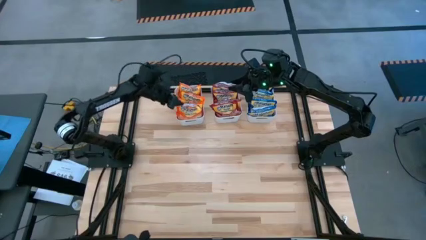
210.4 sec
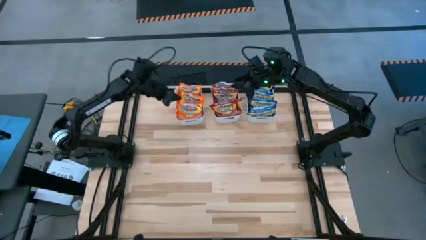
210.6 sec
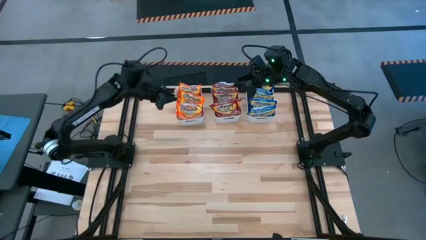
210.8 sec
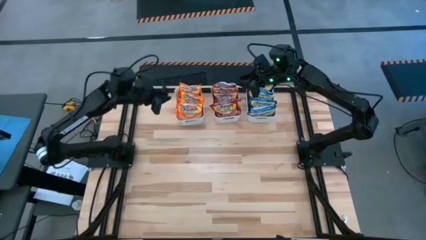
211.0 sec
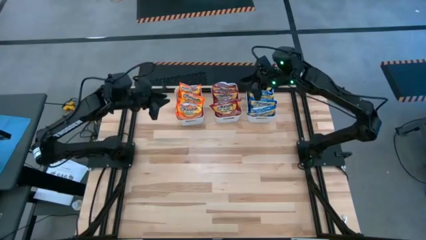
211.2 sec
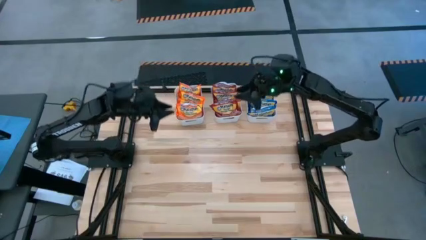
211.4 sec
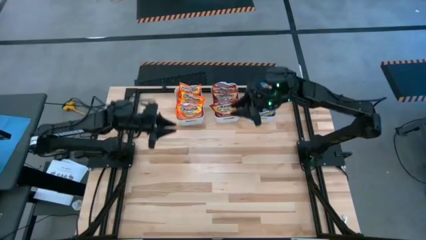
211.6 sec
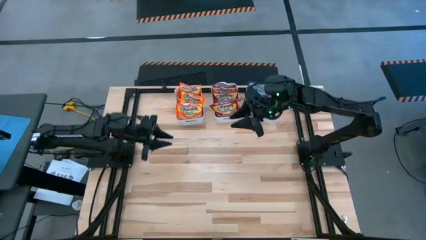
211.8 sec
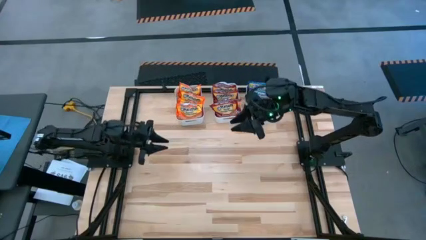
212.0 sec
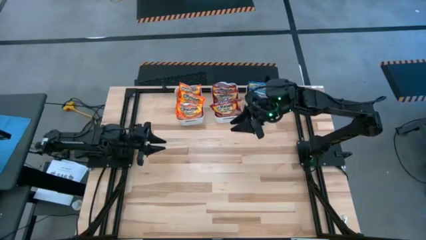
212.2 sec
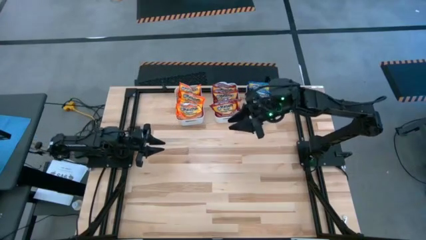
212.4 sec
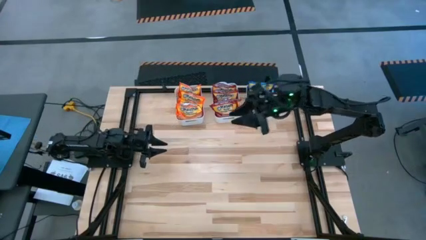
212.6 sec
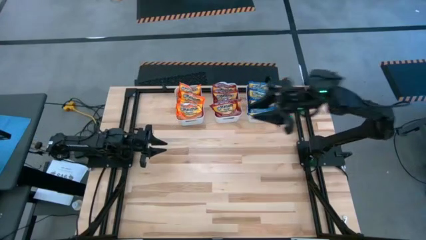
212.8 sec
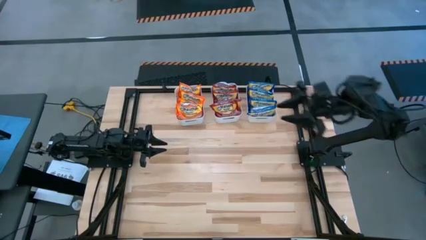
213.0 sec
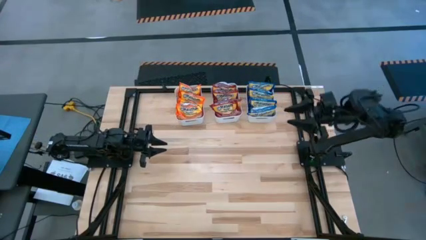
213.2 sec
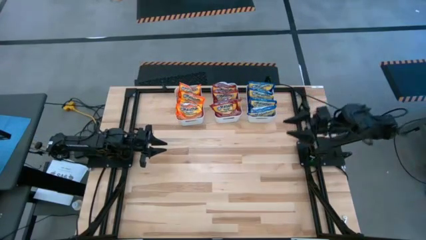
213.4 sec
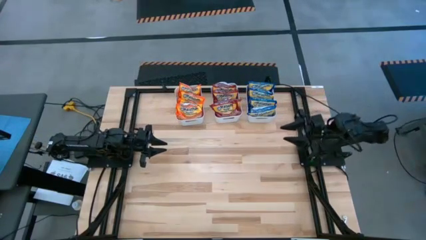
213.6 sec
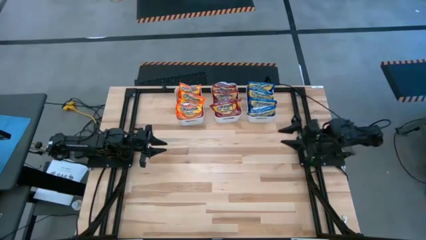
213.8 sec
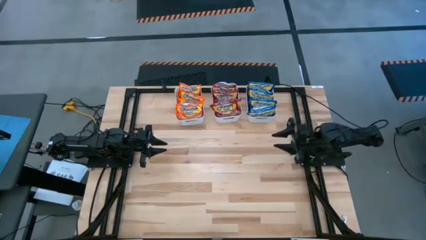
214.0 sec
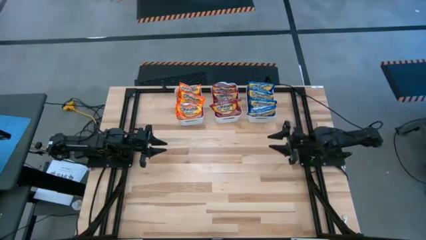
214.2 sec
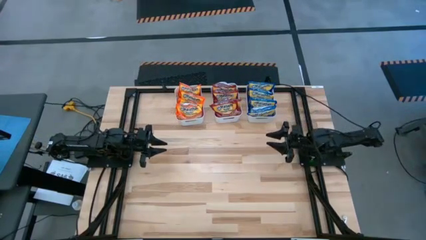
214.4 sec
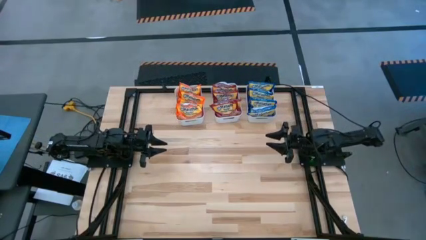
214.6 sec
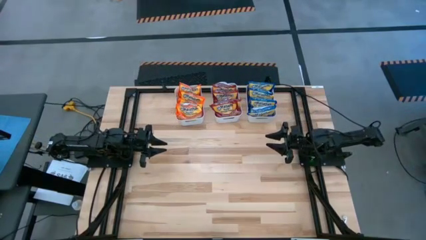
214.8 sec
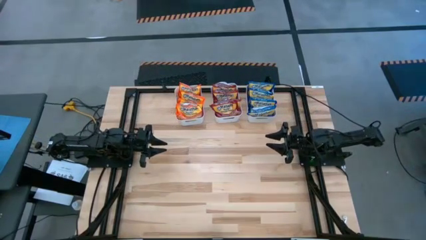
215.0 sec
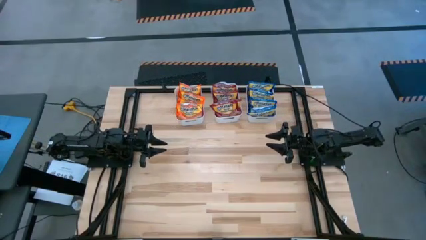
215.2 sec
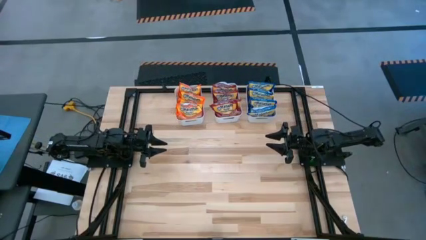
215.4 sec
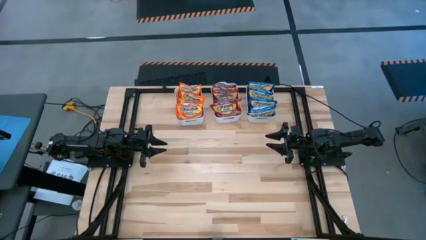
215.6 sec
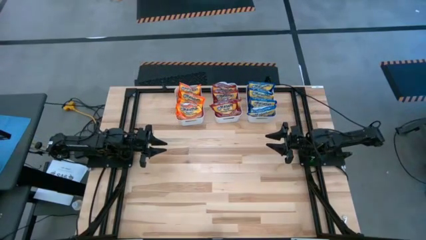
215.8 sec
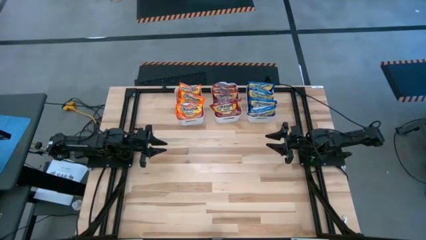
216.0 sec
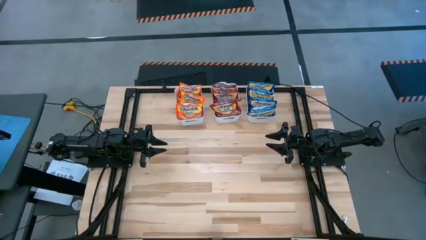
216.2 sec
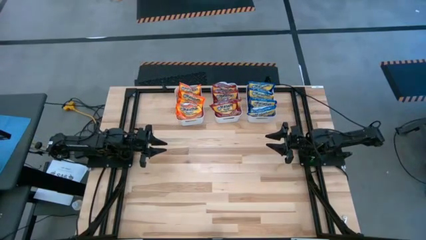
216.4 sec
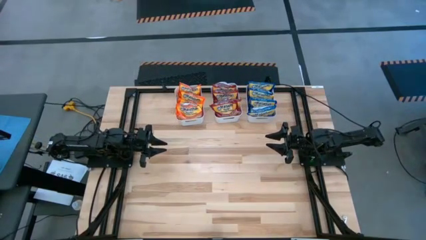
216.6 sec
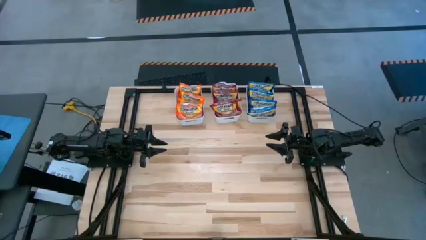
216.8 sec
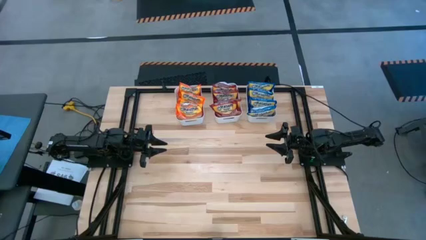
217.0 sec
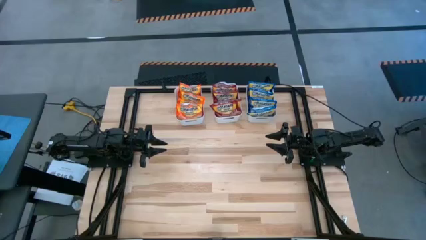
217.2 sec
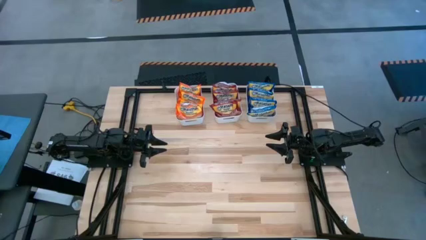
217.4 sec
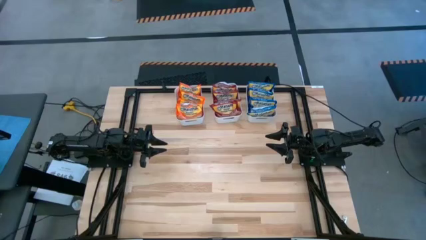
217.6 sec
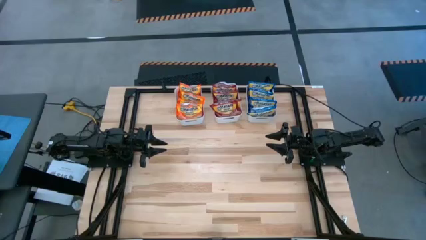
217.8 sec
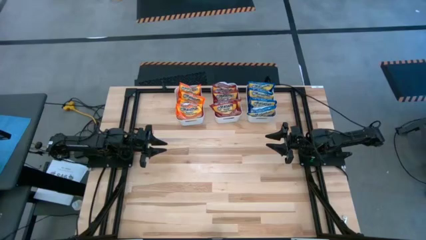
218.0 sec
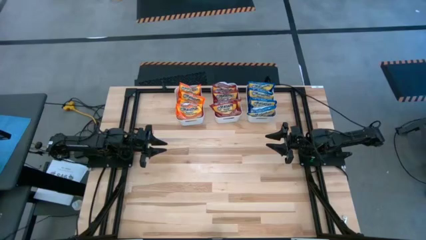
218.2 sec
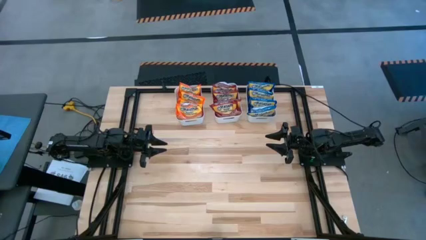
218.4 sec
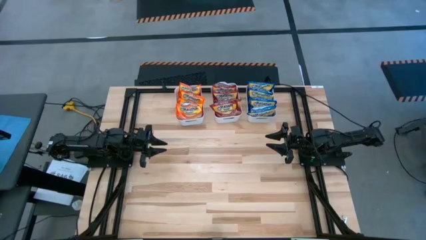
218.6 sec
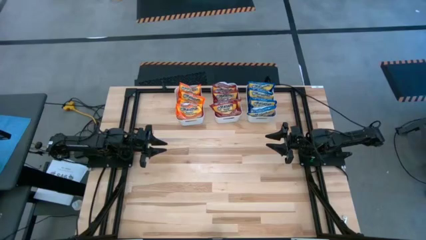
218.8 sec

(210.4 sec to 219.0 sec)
Task: Sort Maruchan noodles
Return to Home Position

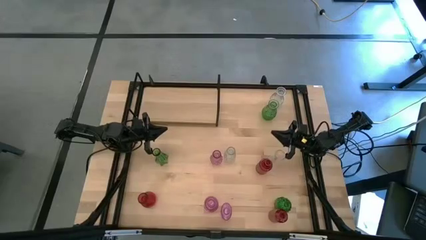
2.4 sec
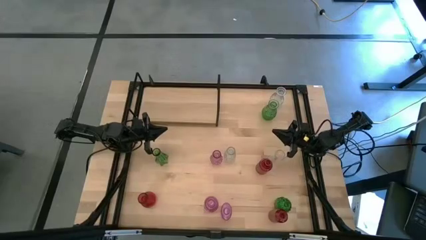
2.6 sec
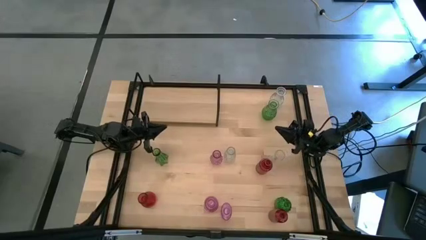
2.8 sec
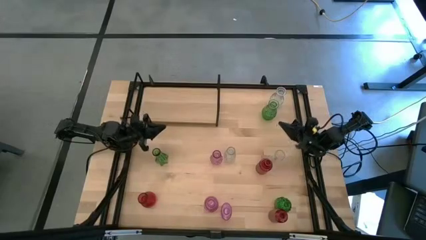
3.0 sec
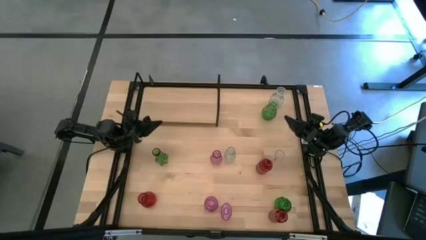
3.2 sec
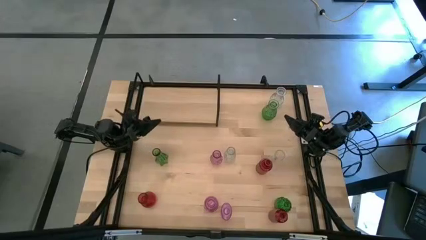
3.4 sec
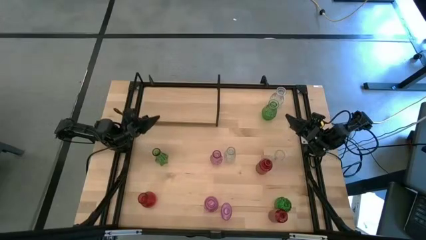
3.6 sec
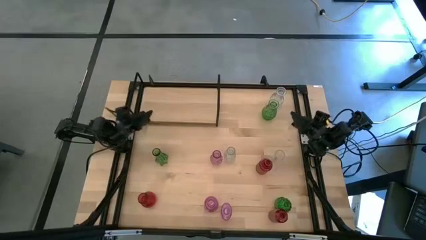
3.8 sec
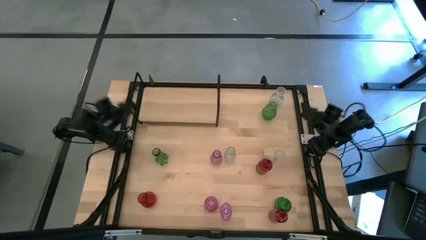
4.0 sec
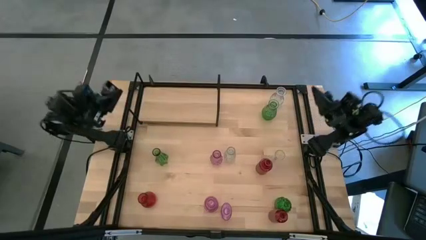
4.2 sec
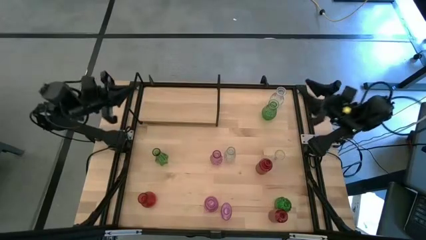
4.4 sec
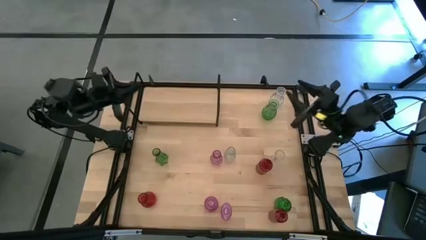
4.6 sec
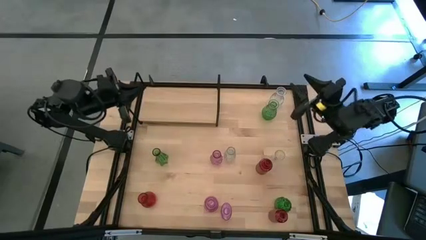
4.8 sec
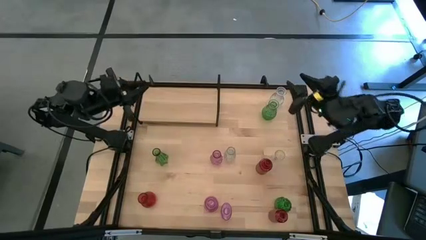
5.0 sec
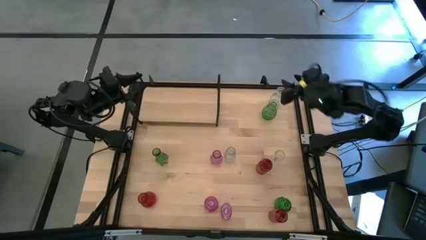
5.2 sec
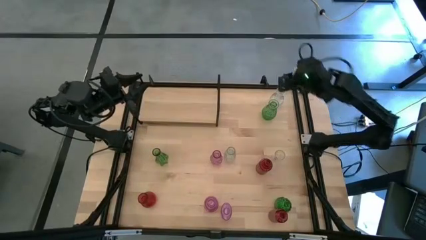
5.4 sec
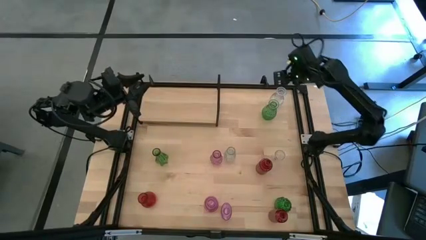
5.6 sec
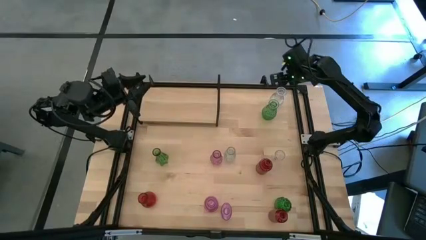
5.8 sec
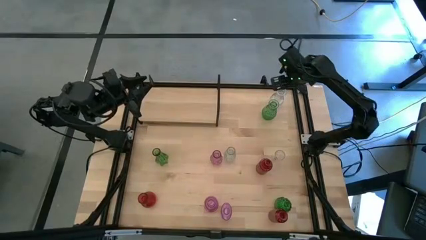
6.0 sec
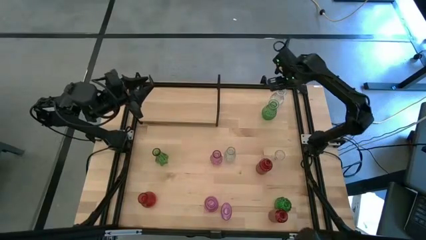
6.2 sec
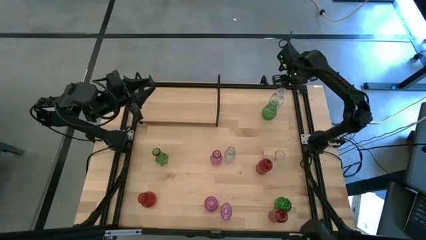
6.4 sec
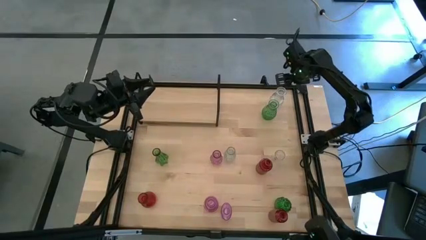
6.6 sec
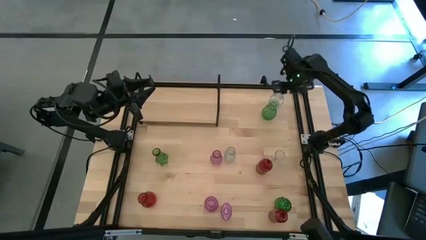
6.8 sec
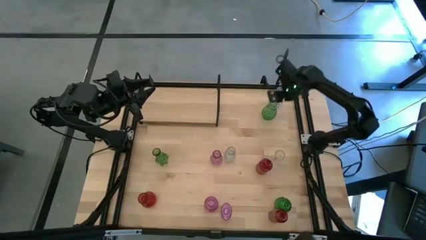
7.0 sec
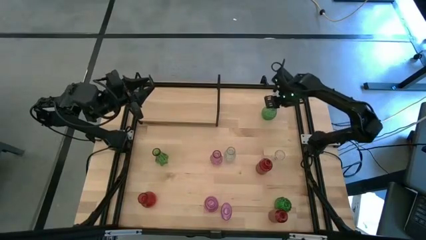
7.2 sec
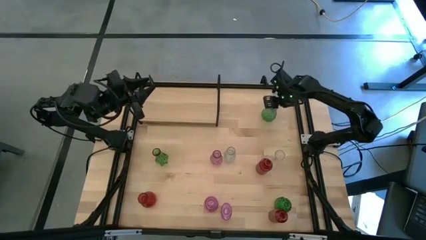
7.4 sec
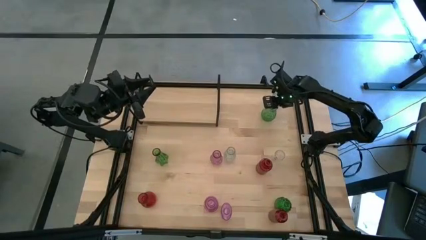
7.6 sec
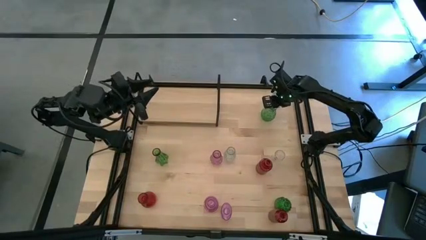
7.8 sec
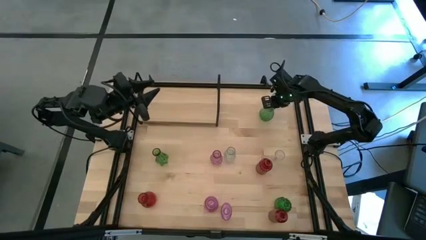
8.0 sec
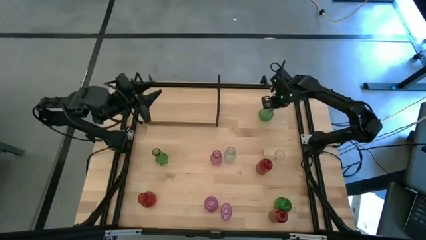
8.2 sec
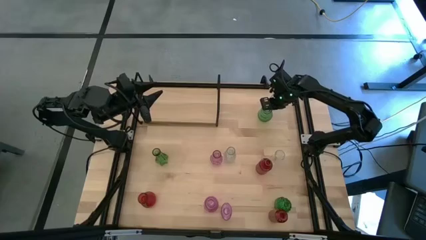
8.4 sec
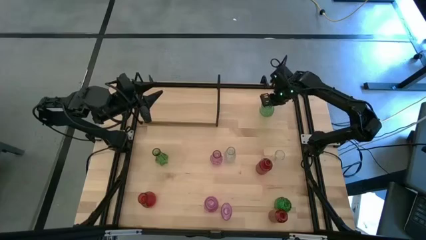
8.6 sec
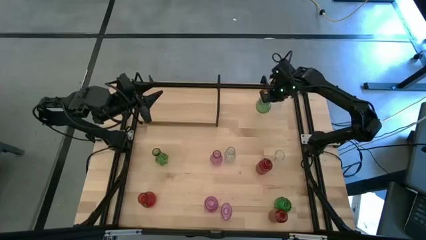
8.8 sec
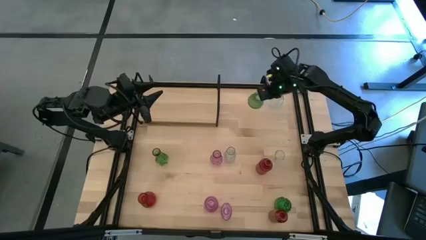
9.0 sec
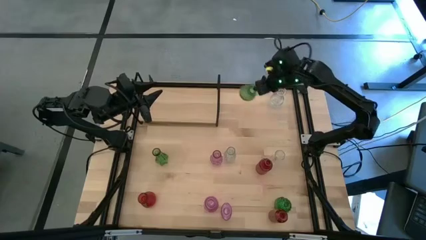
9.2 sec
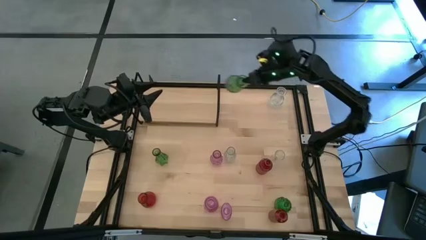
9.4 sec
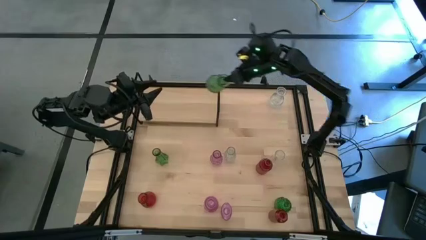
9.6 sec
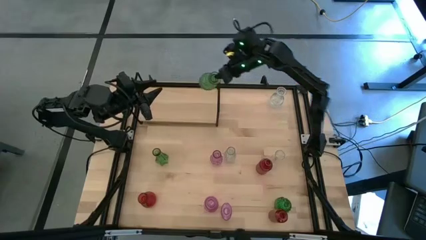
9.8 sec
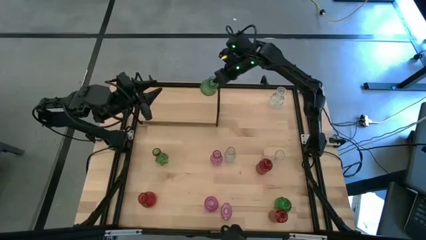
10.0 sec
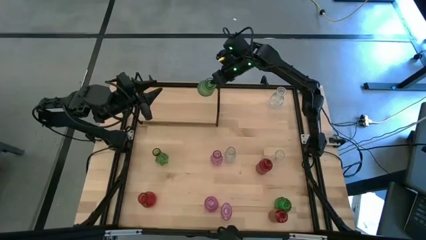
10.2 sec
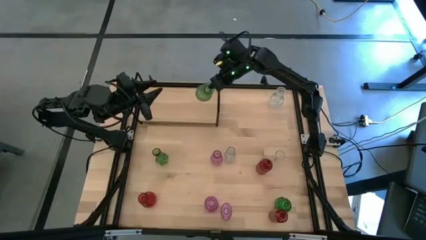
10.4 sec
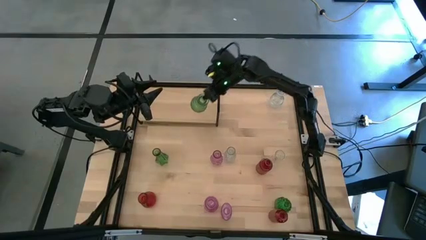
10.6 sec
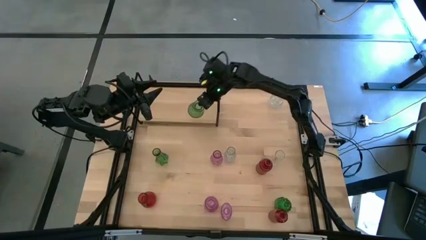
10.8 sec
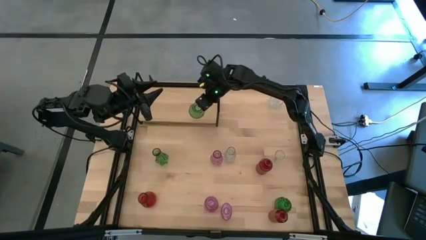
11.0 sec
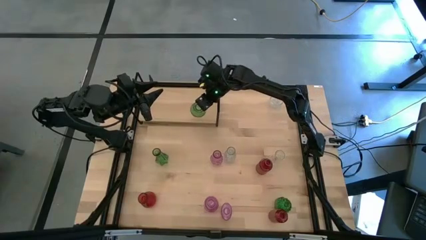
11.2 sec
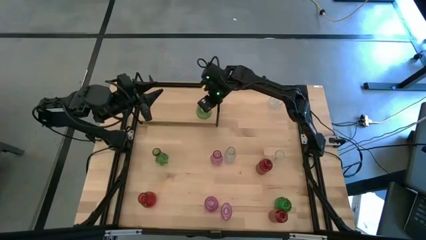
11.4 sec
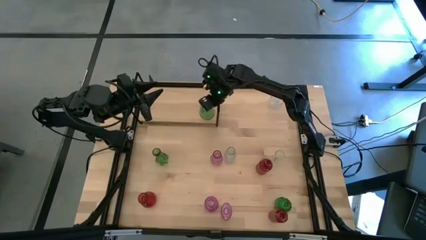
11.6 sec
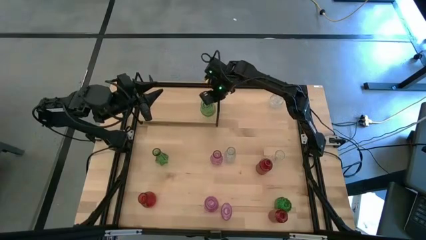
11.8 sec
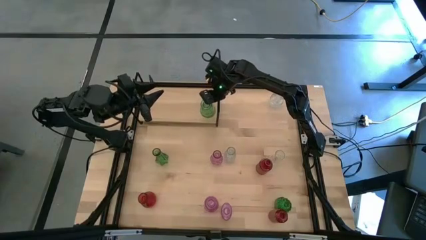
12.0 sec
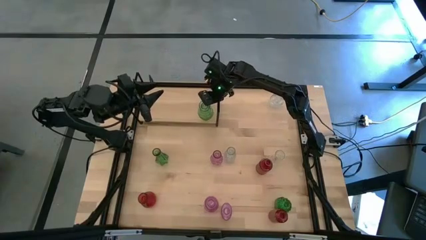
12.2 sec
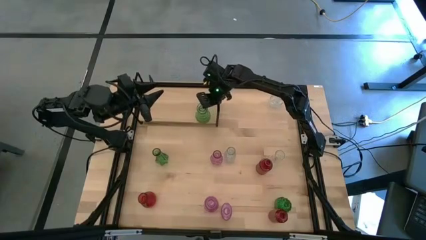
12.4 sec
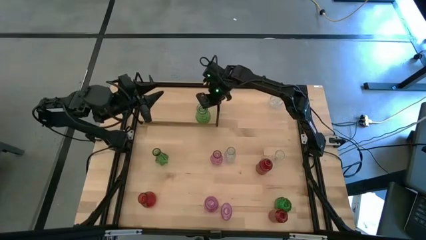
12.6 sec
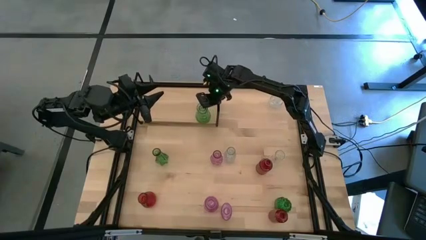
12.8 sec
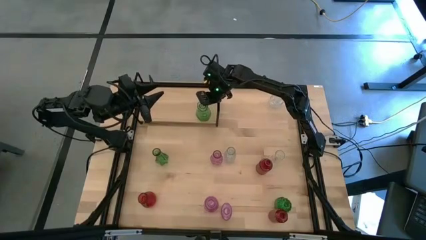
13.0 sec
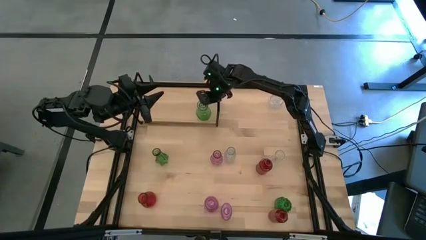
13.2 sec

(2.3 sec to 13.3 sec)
Task: sort vases onto shelf
Put the top green vase on the shelf
